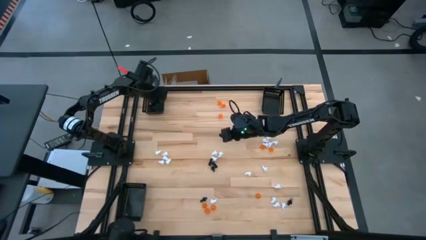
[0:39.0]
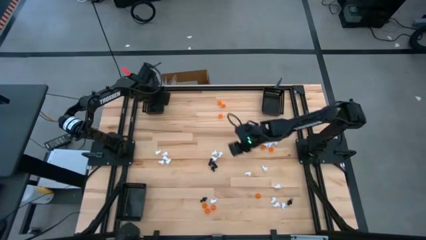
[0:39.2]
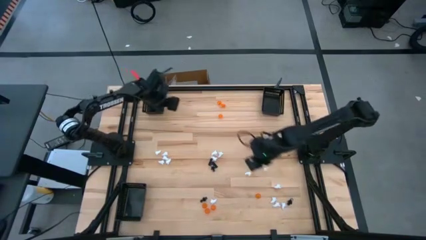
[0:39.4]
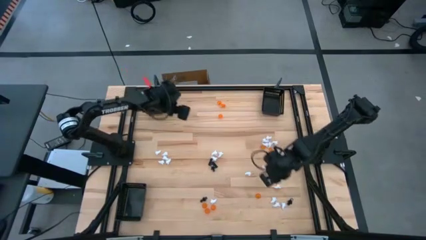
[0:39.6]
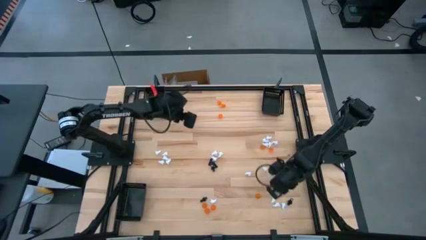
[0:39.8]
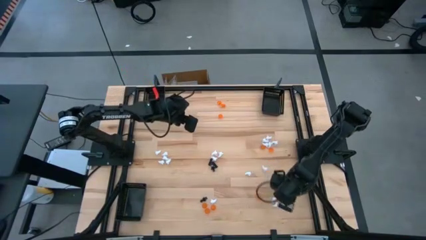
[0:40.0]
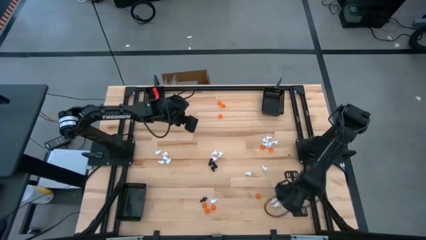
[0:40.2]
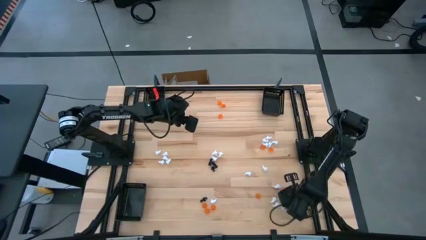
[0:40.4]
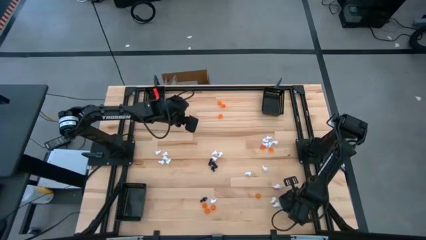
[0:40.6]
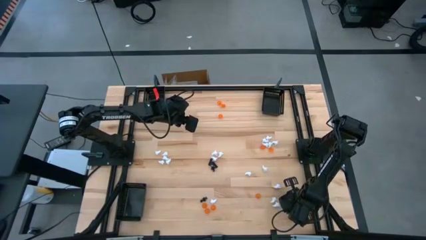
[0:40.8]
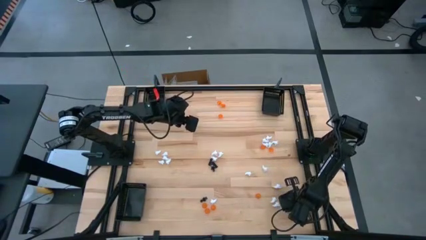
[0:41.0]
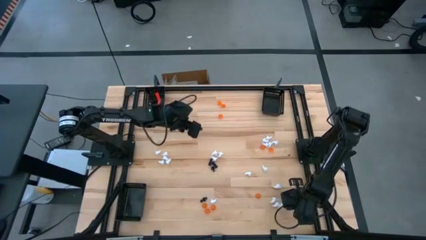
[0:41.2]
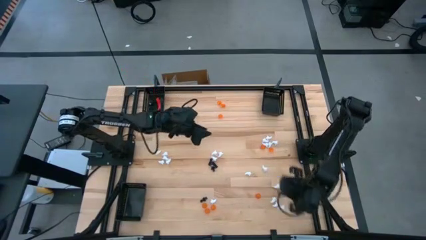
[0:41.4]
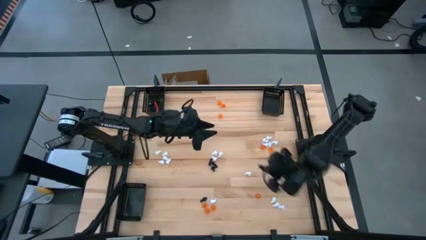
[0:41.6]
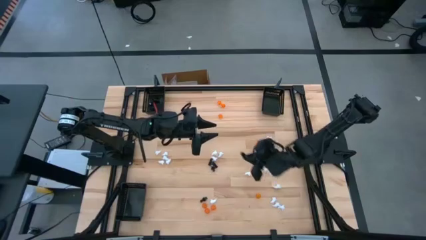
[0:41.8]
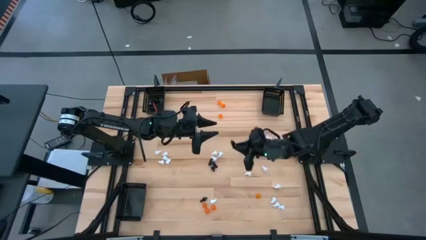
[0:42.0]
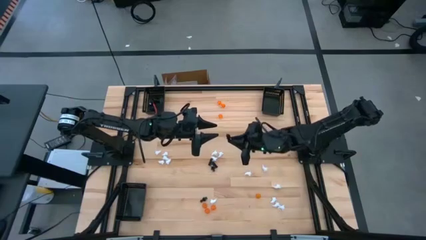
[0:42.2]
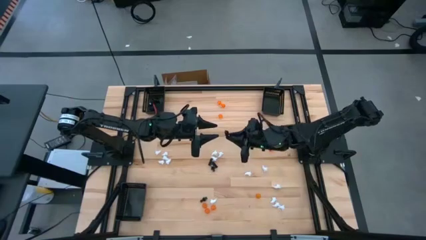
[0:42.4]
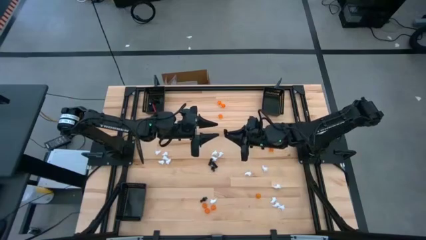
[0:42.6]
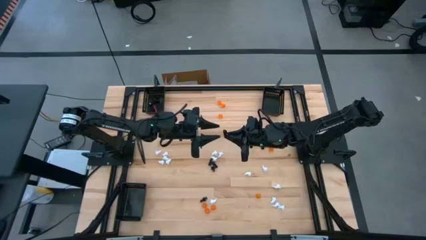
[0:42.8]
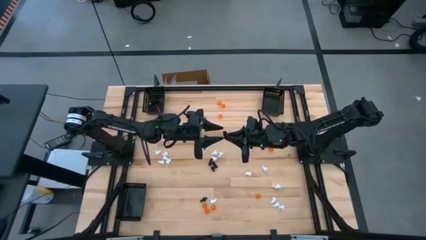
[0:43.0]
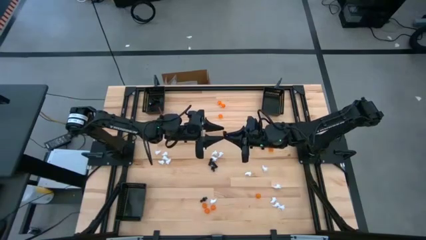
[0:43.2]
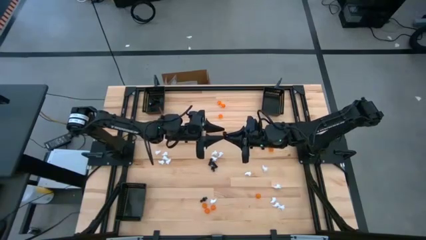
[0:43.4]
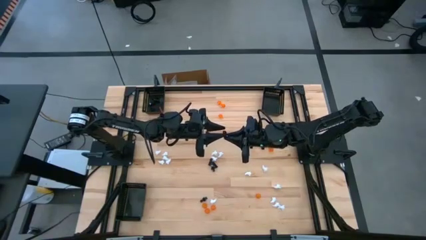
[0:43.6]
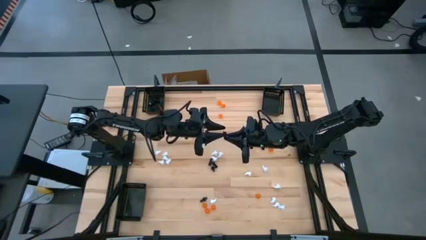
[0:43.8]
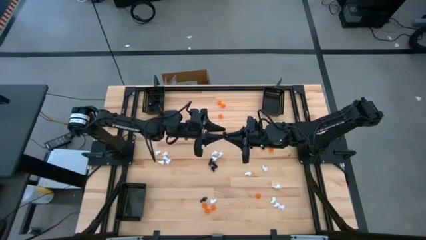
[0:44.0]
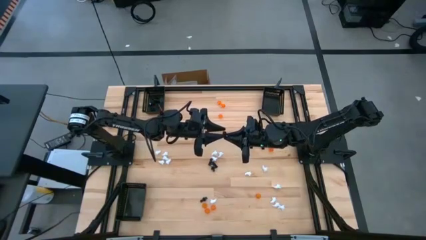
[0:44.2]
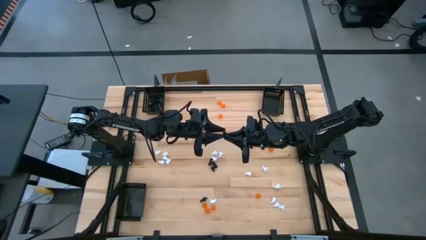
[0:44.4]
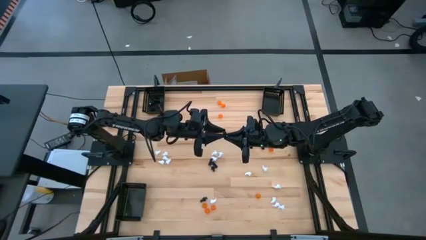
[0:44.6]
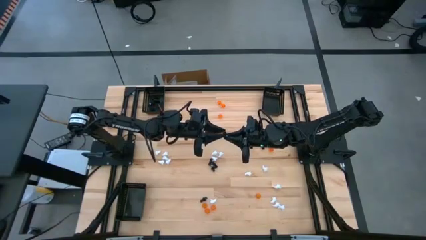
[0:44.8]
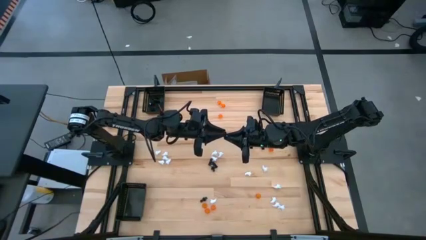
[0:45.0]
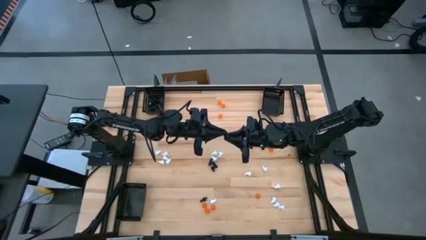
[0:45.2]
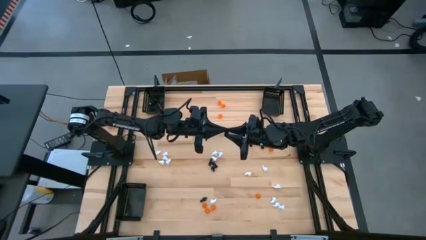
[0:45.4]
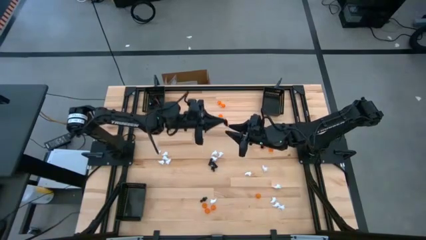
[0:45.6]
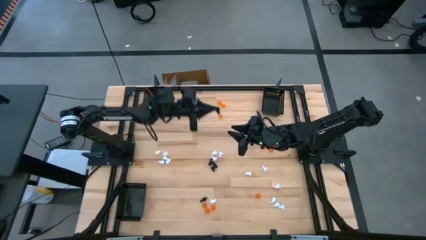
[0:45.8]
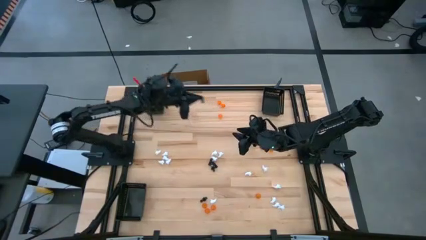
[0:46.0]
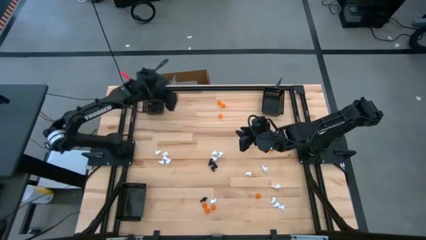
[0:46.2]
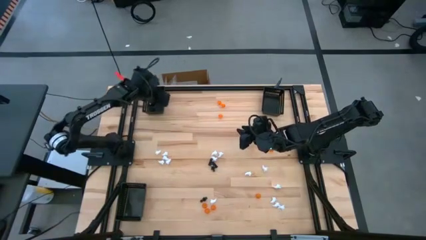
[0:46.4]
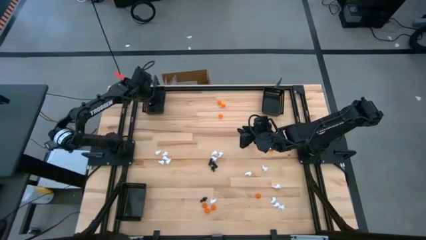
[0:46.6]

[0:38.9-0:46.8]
Task: Sort Halloween decoration
Put the black skeleton toy into the top left black basket

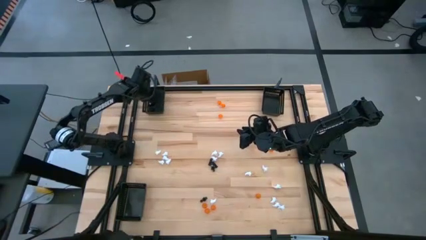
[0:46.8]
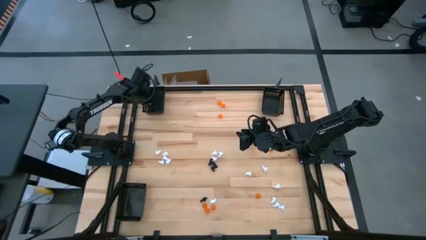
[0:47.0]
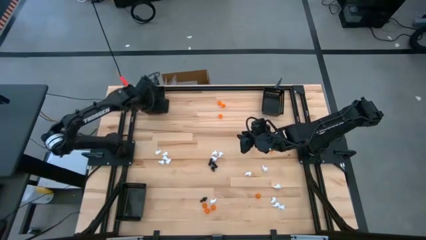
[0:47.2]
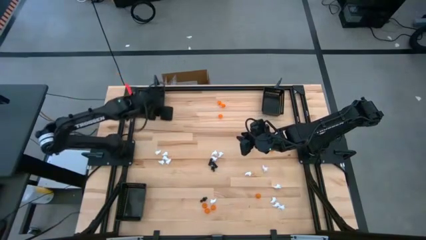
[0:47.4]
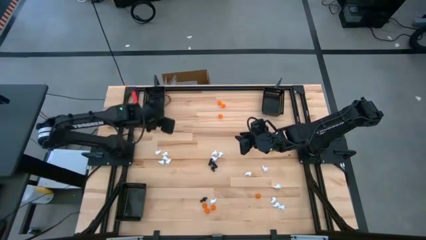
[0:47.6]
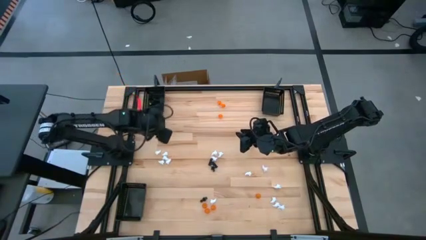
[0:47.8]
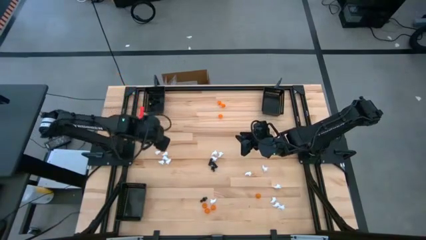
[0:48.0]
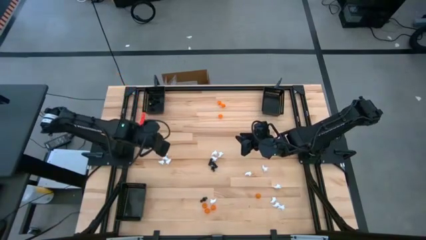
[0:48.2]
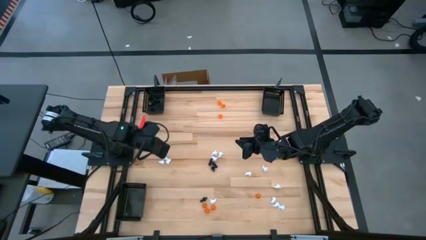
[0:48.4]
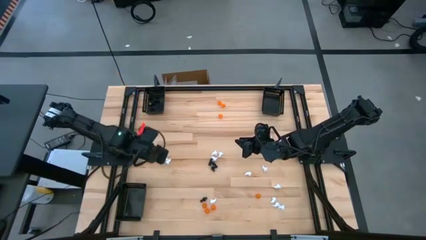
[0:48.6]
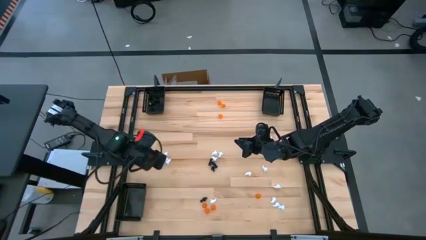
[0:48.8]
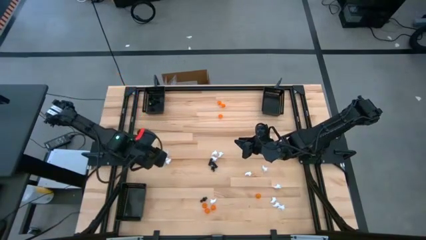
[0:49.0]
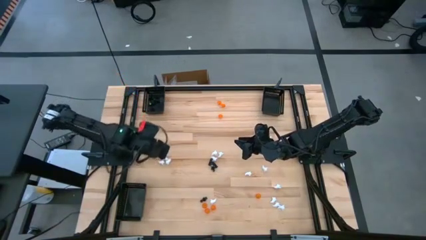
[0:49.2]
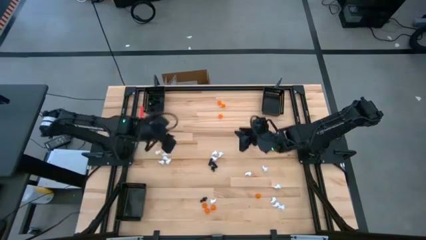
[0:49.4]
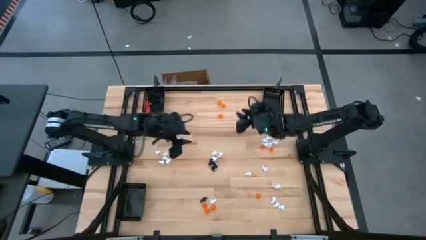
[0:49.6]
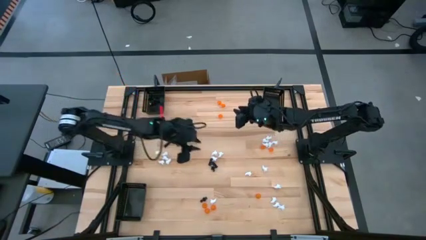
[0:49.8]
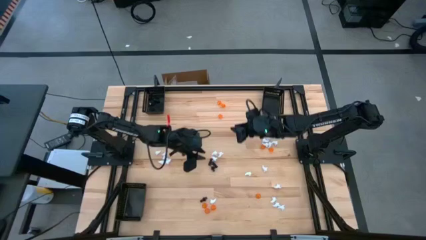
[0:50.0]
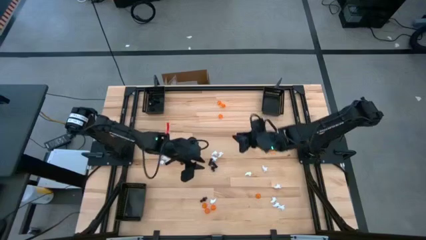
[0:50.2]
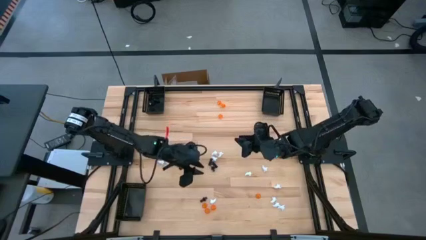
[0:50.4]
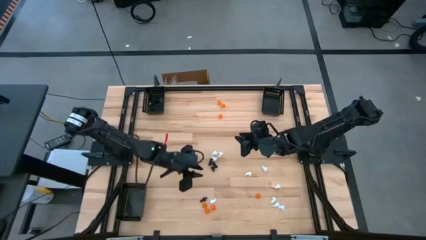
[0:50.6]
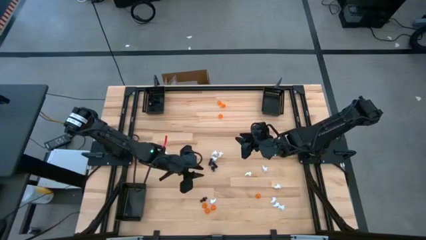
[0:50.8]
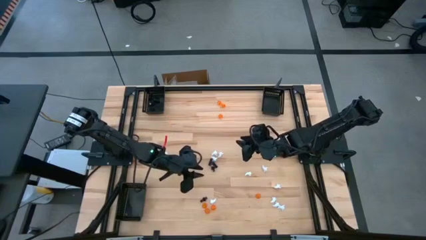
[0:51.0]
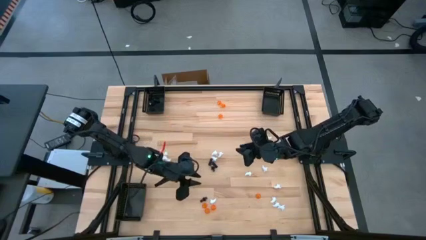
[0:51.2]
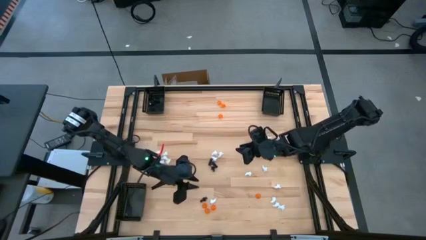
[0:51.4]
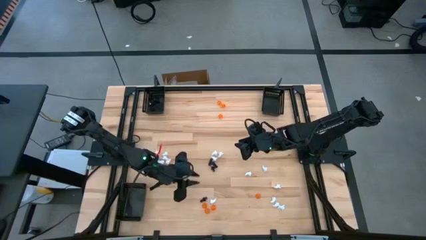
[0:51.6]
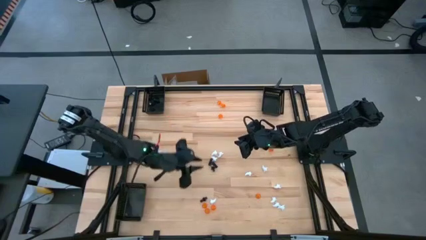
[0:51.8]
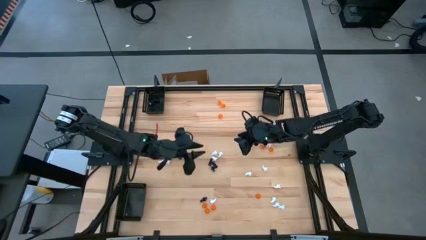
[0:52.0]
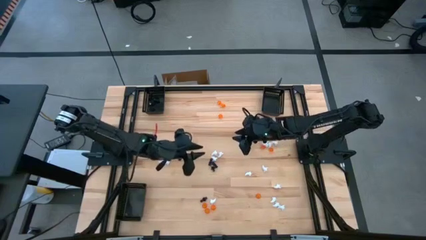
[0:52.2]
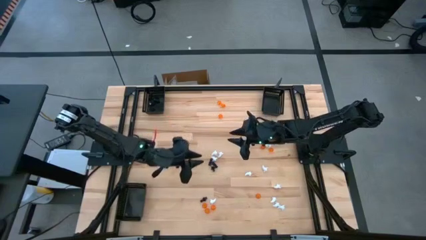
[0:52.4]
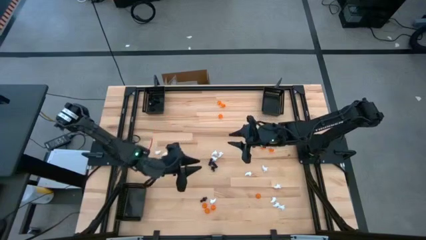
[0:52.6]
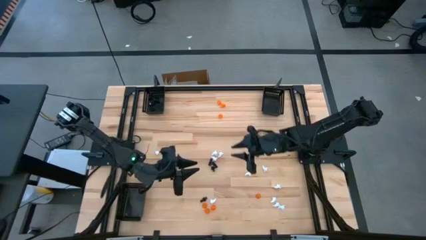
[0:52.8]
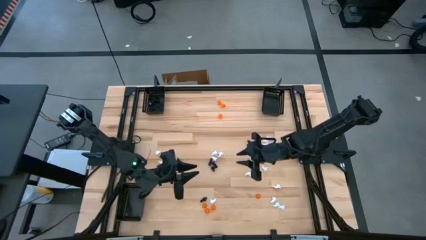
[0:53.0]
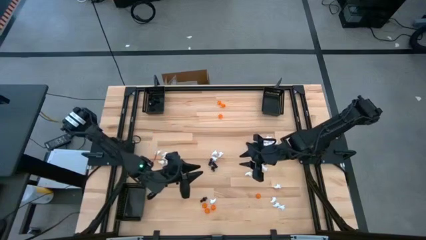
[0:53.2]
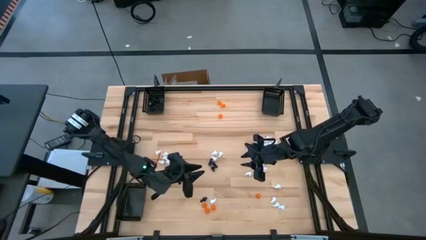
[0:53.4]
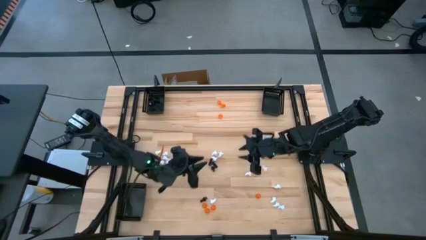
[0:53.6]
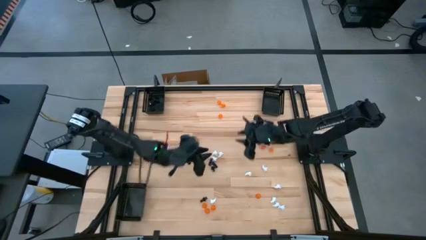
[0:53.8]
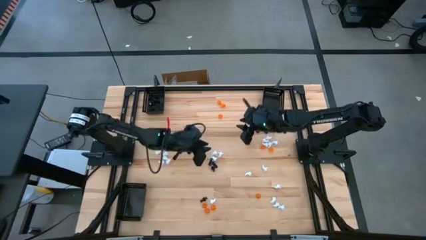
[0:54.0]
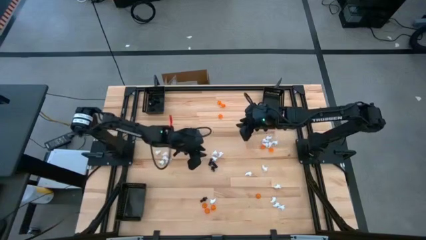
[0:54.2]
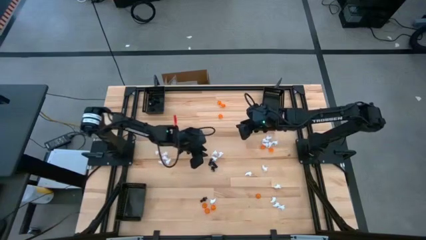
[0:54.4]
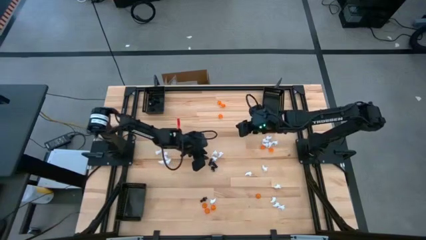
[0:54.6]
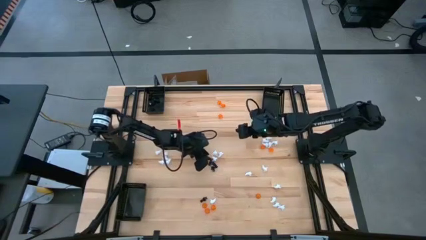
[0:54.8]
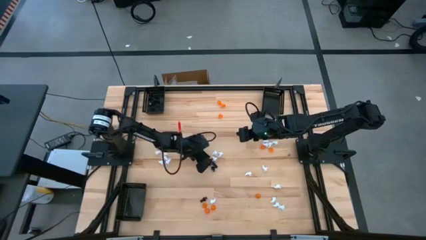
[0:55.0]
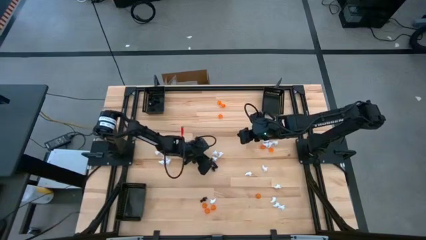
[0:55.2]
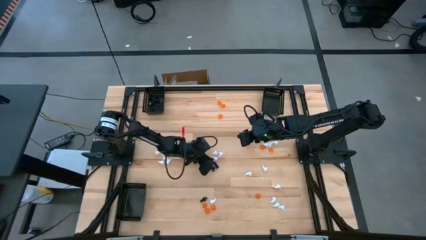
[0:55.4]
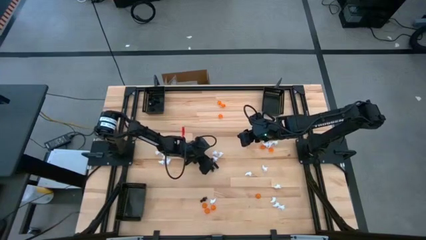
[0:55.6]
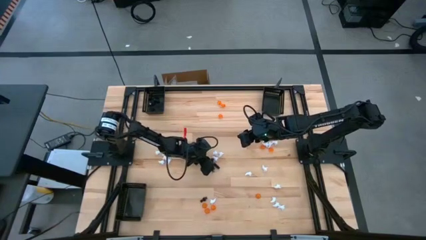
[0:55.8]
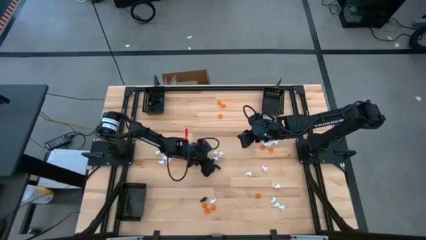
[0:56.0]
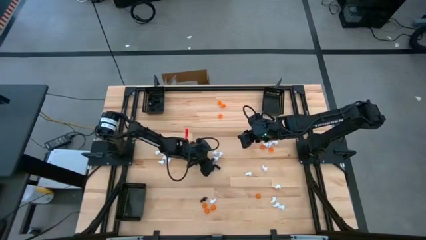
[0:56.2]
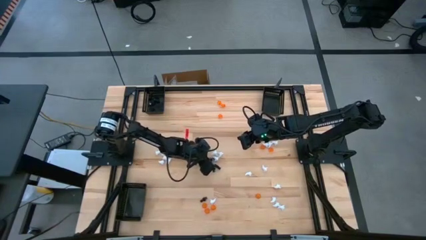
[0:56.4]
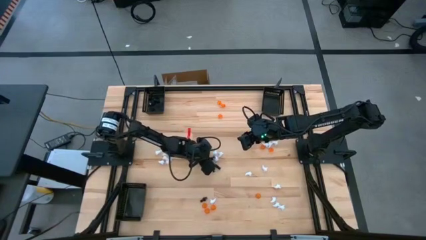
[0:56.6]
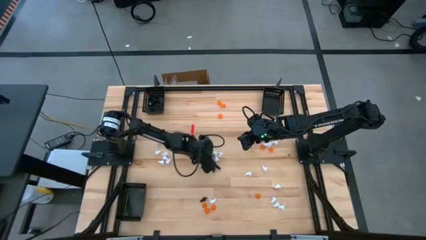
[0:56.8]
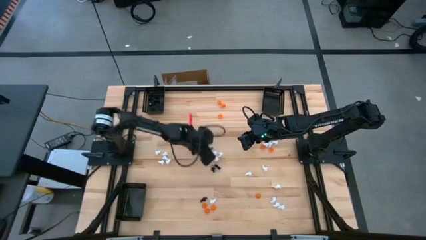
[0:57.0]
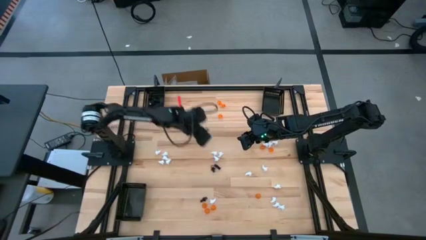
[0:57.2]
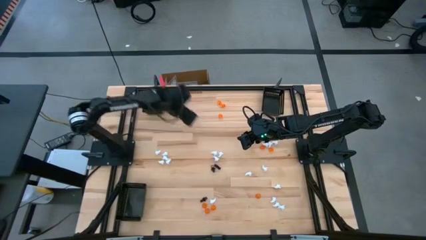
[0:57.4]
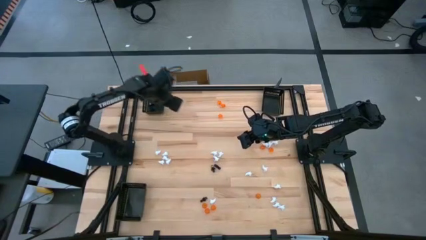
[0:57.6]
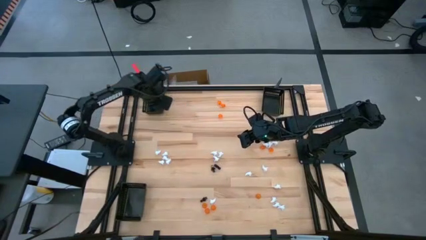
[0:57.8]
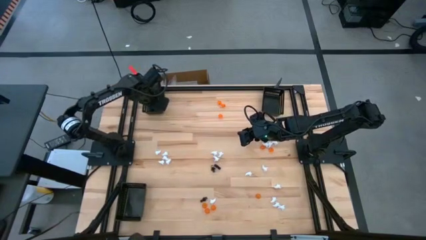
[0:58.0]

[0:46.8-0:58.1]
Put the black skeleton toy into the top left black basket
